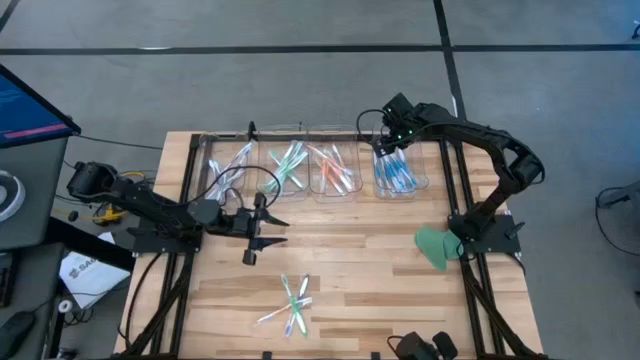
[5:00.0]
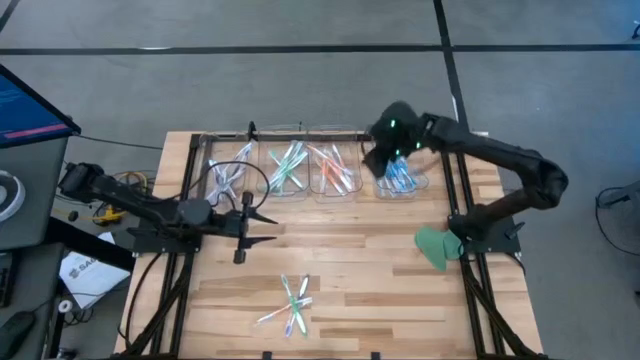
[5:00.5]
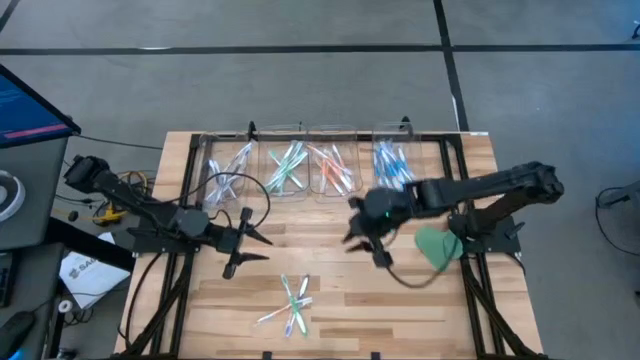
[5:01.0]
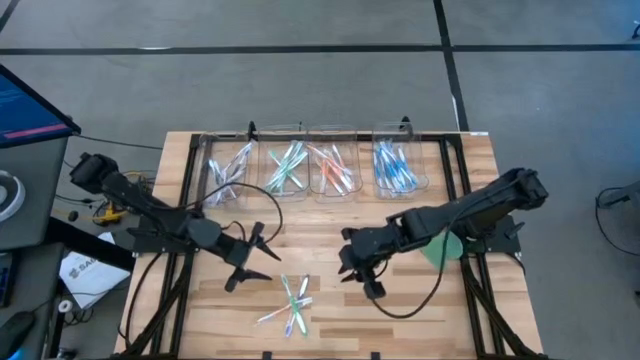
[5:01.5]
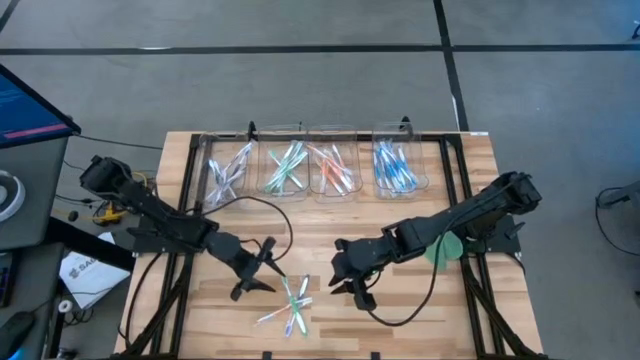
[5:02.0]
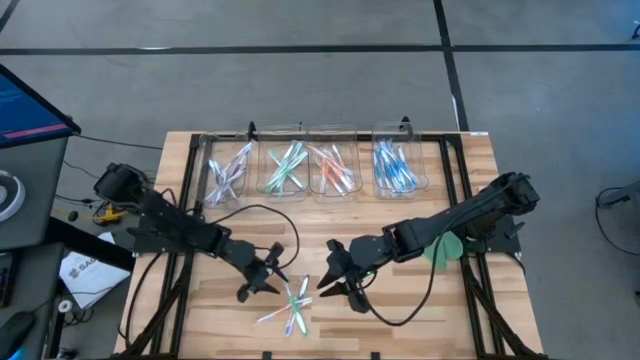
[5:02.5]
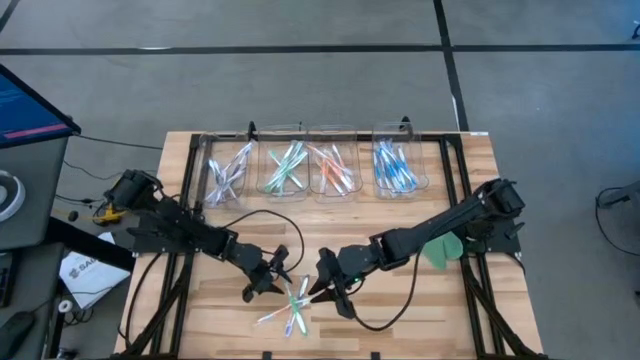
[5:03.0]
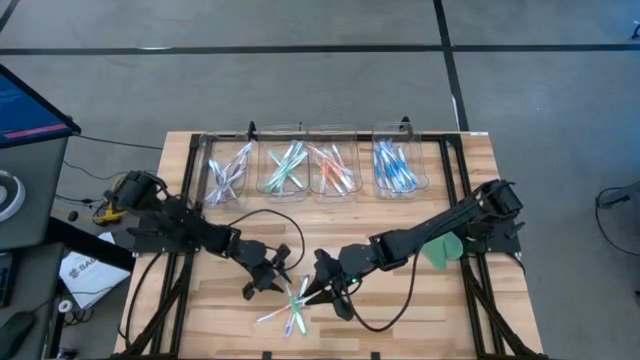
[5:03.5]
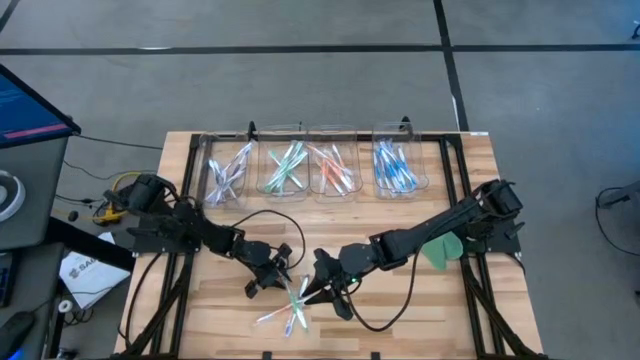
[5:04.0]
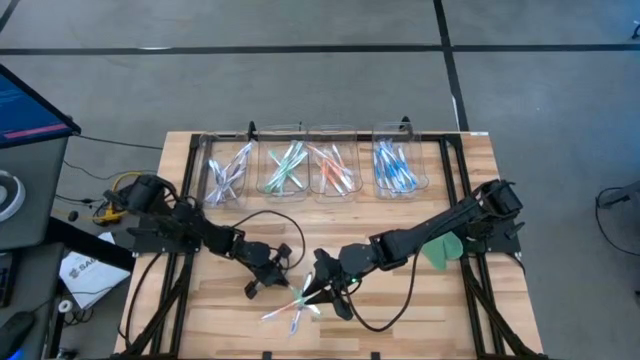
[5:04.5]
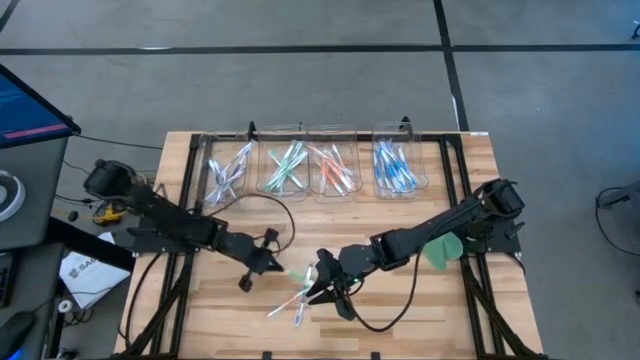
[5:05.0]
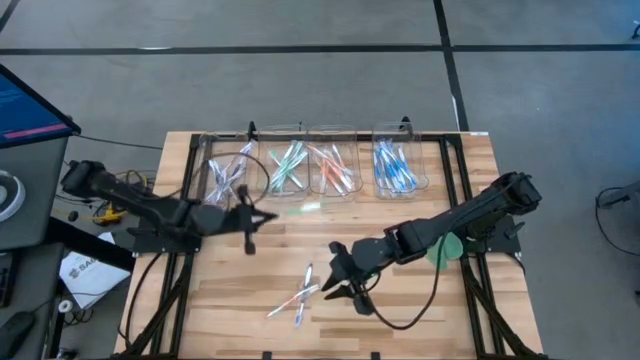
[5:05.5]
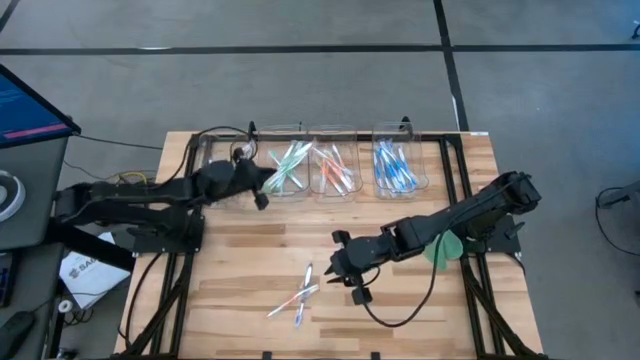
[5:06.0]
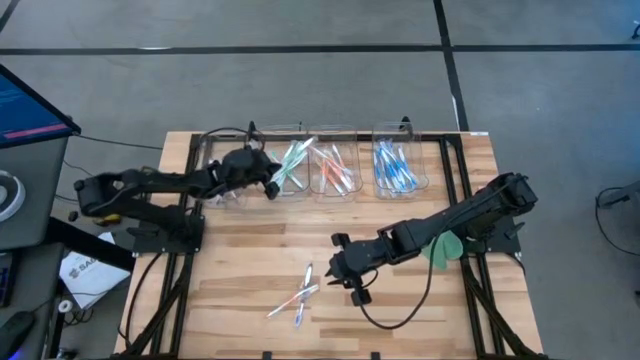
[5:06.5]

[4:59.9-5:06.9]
Task: Pick & Place Toothbrushes
Put the green toothbrush into the middle left transparent bin

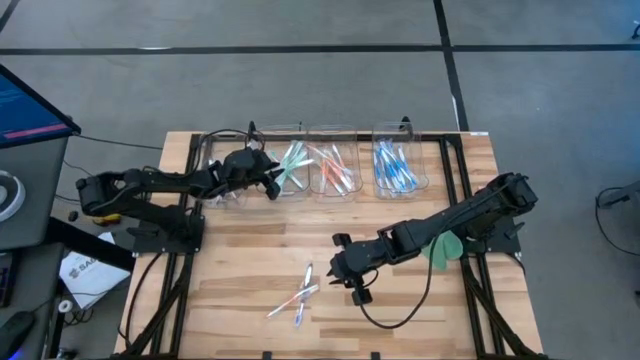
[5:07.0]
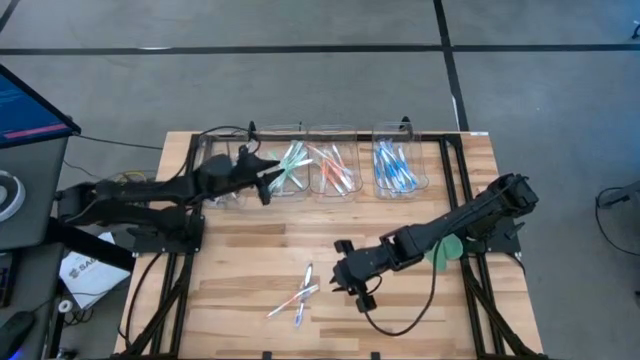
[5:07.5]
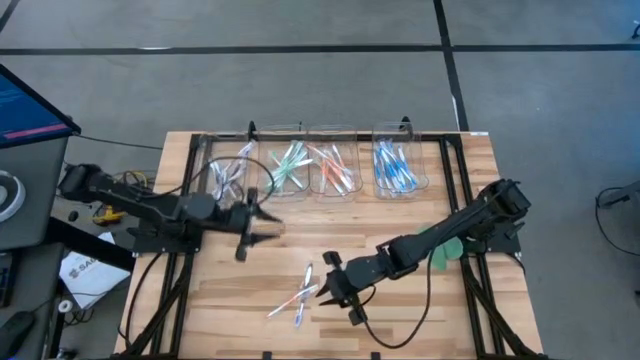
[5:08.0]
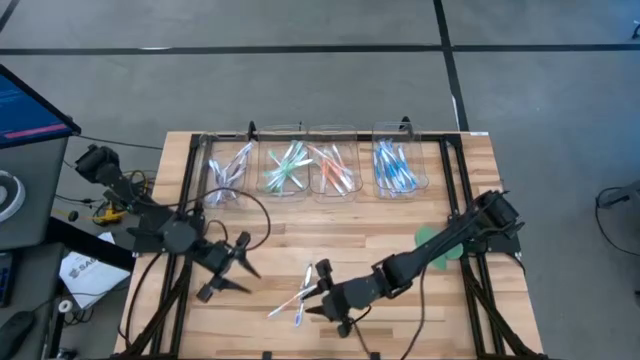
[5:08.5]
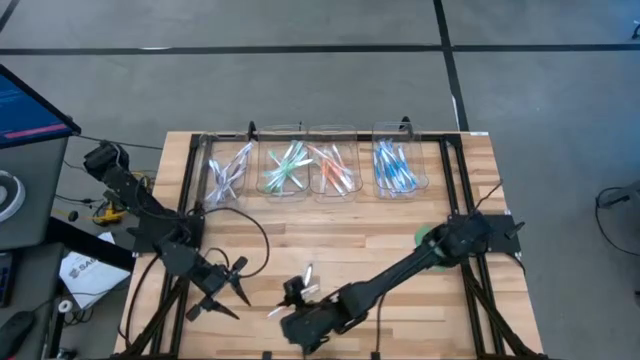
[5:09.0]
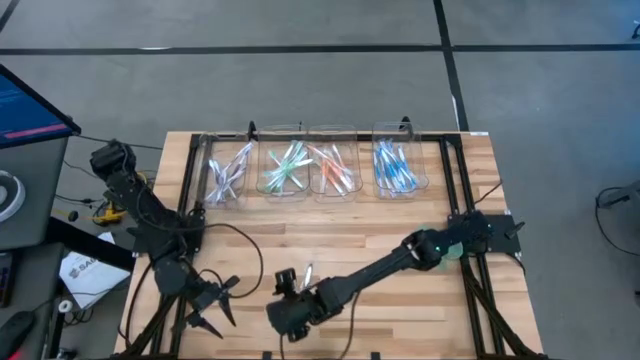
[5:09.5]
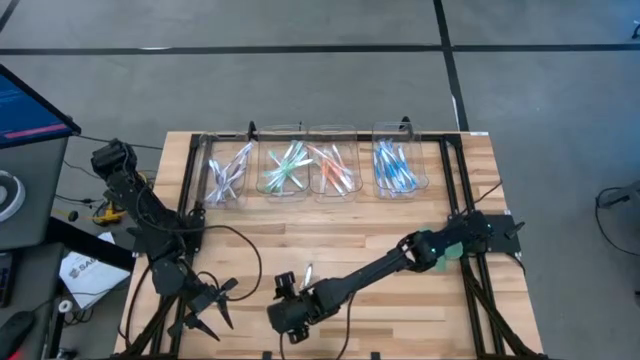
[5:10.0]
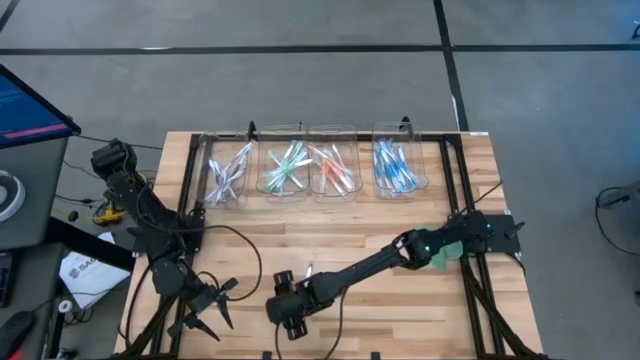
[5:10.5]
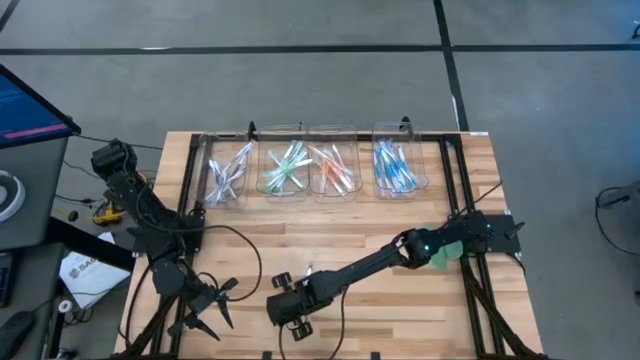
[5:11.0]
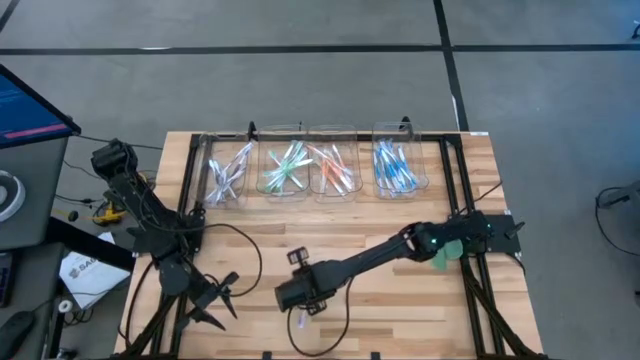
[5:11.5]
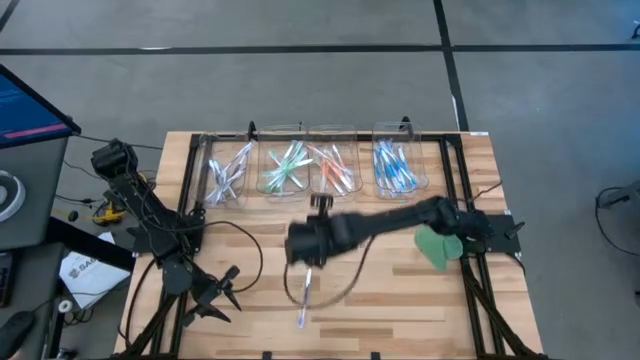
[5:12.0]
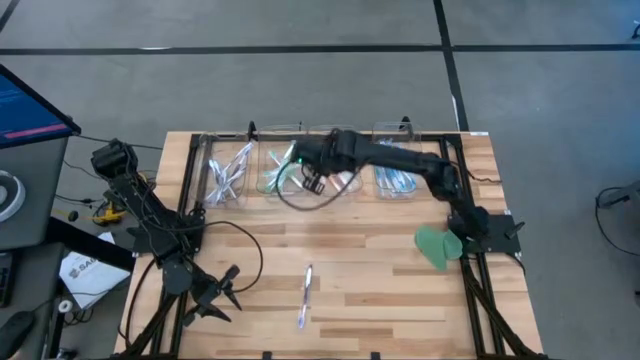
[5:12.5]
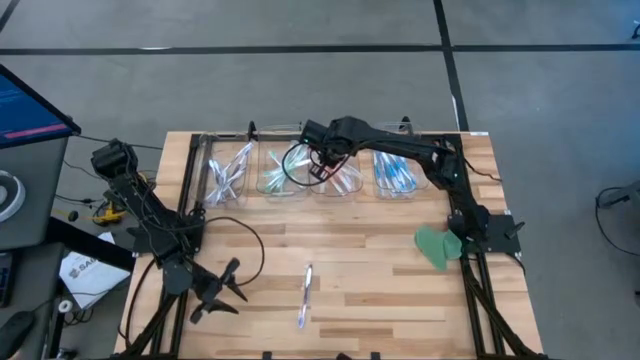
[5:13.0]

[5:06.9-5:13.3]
Put the orange toothbrush into the middle right transparent bin

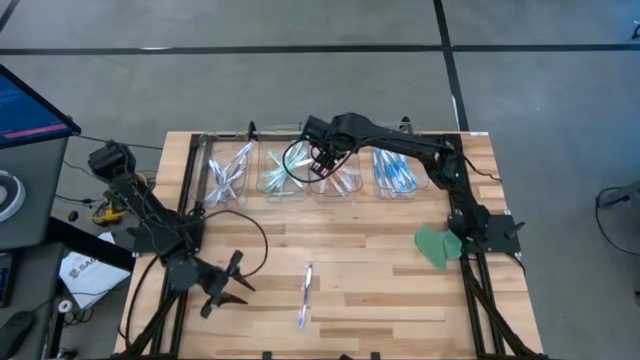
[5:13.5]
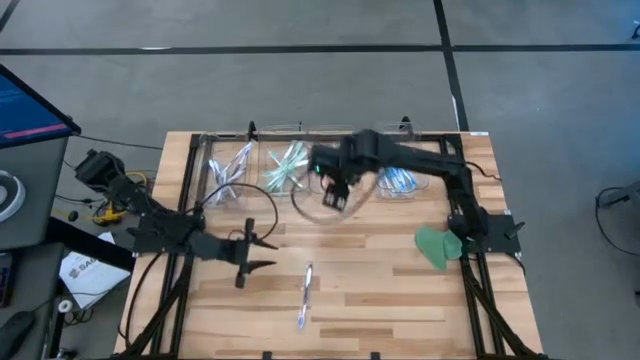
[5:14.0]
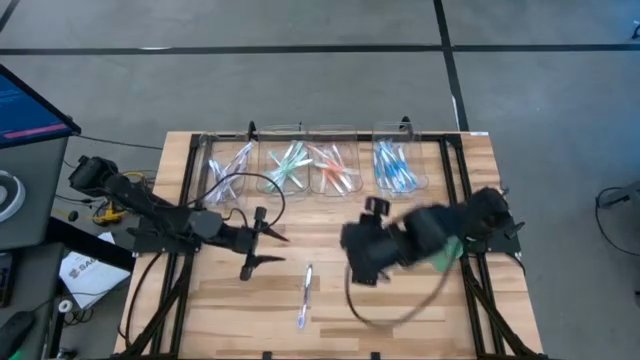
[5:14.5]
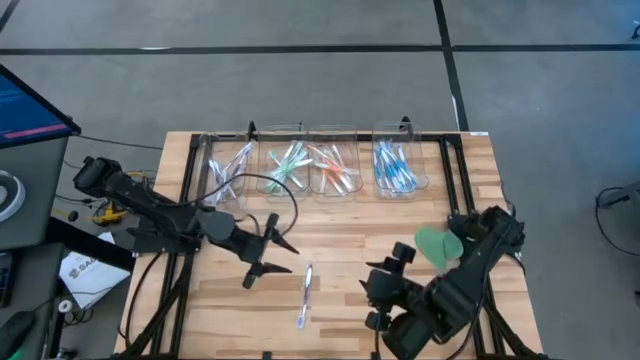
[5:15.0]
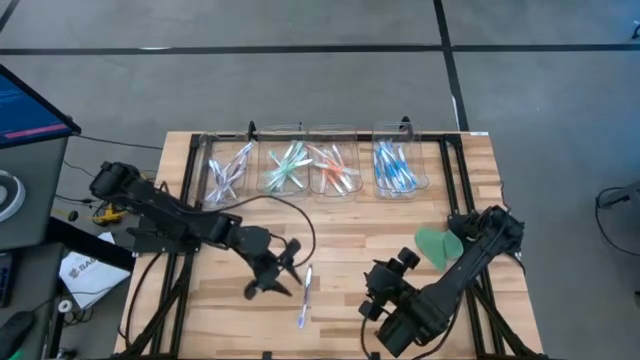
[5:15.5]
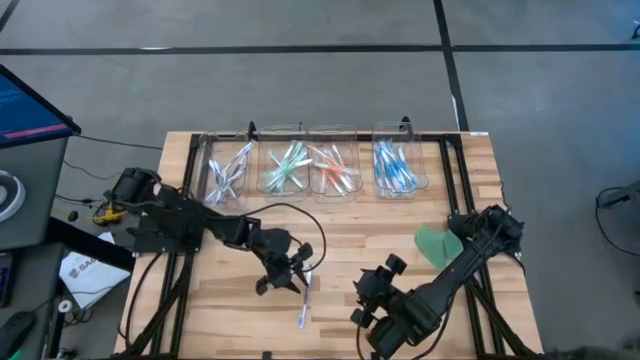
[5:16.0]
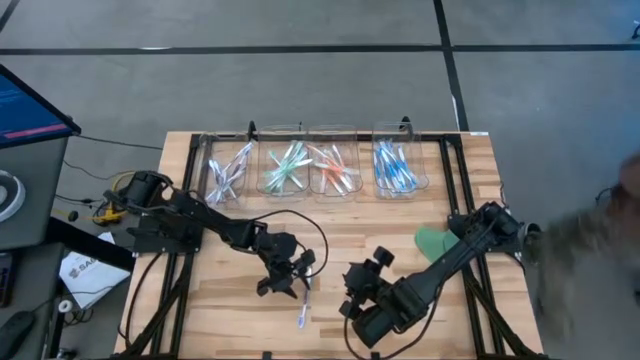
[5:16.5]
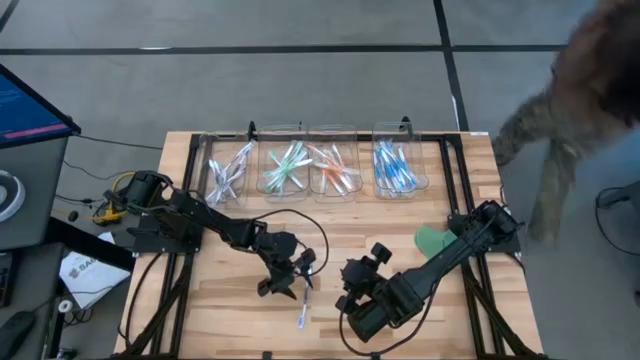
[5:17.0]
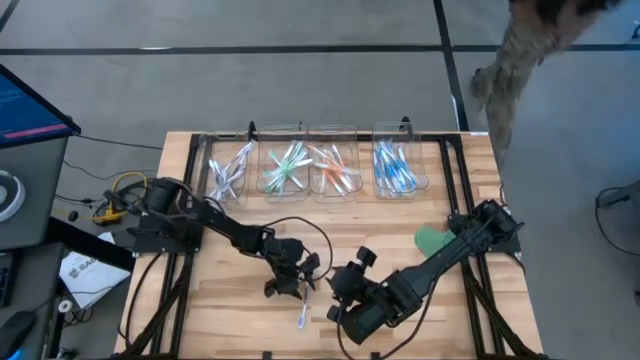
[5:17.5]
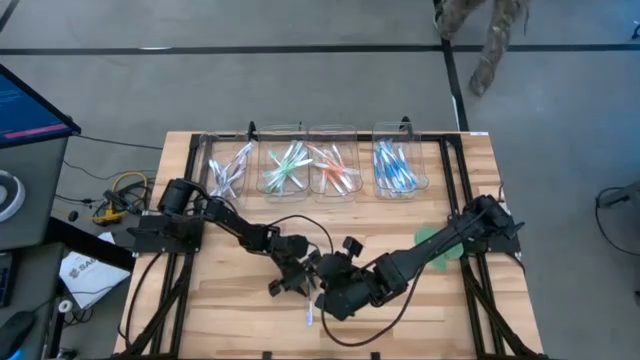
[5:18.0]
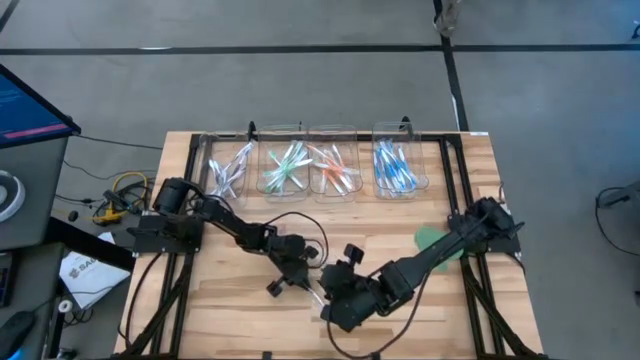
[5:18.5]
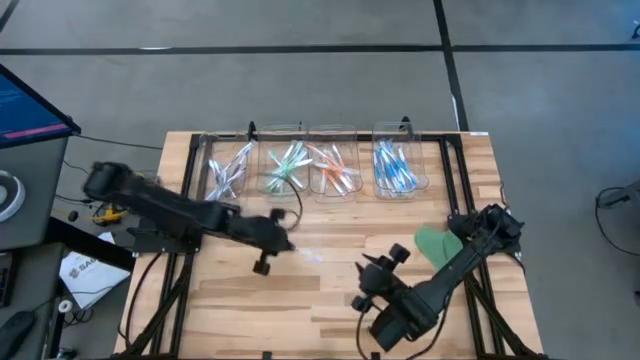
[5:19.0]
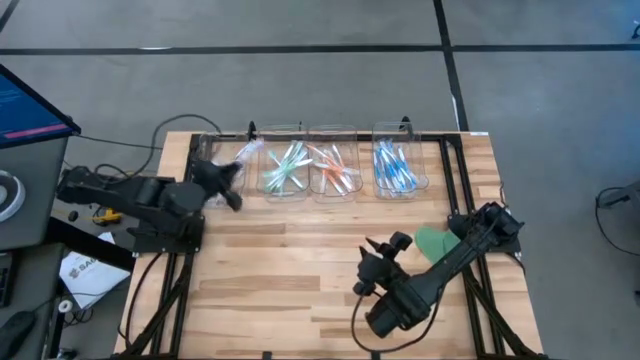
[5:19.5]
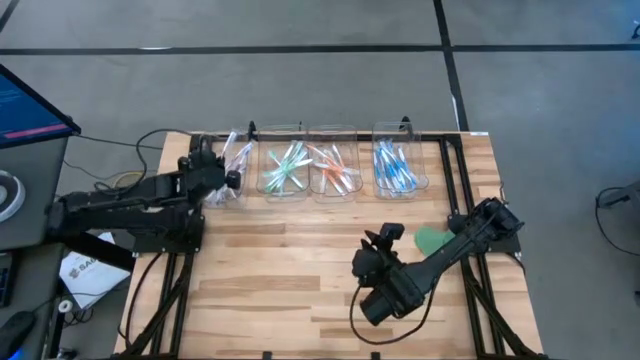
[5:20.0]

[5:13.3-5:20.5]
Put the violet toothbrush into the left transparent bin

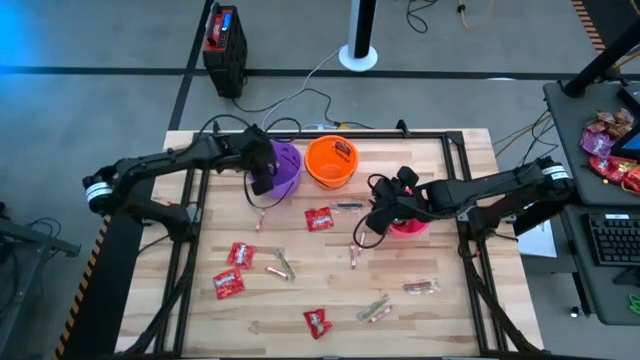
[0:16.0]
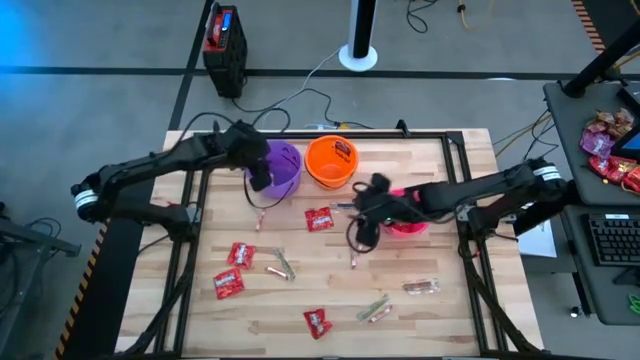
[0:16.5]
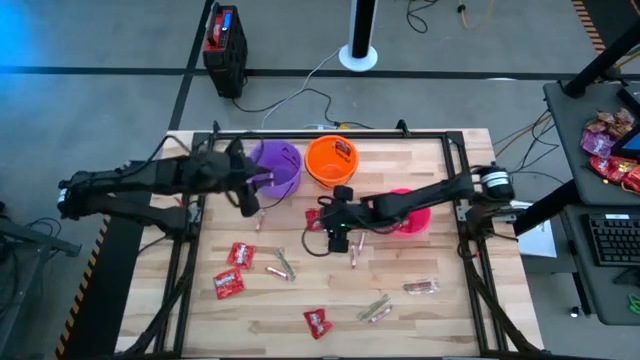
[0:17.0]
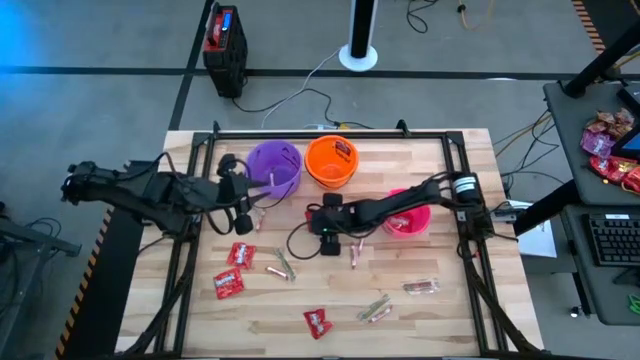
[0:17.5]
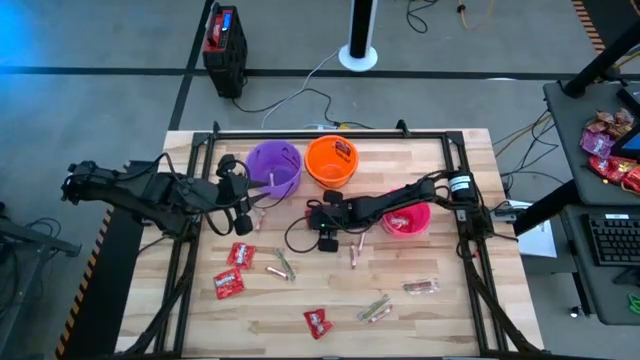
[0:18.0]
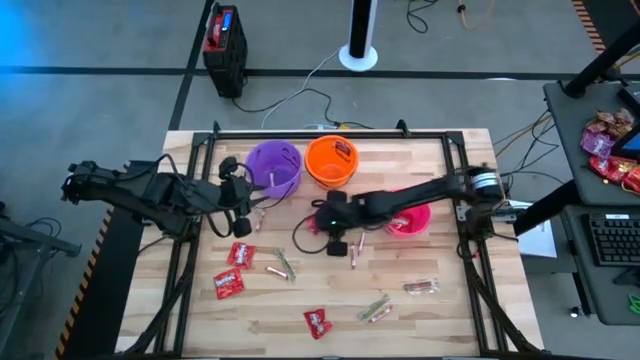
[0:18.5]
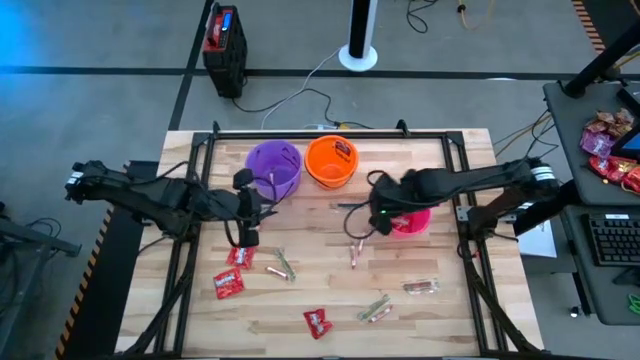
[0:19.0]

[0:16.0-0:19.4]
Task: Sort candy by brand, put in halloween buckets
Put the red candy into the pink bucket
